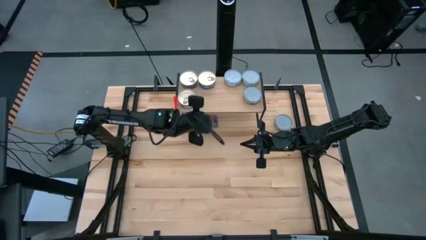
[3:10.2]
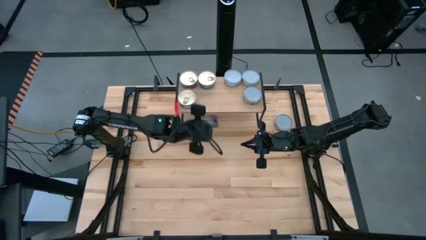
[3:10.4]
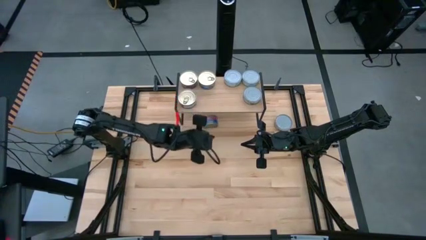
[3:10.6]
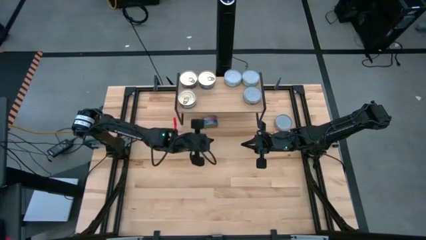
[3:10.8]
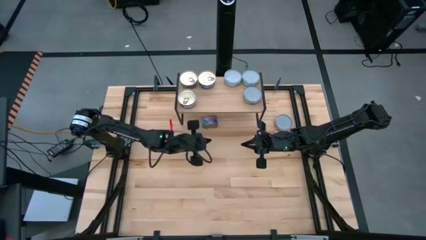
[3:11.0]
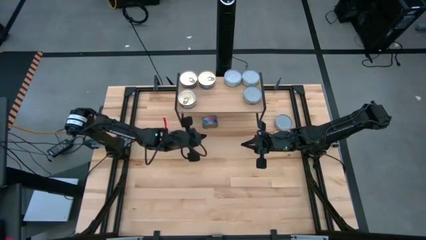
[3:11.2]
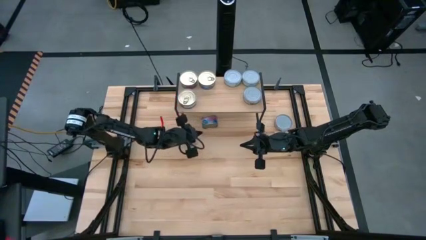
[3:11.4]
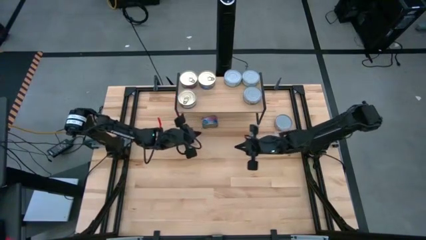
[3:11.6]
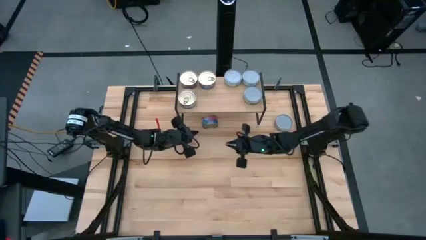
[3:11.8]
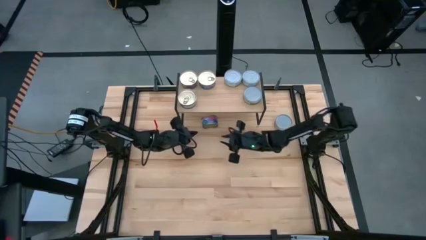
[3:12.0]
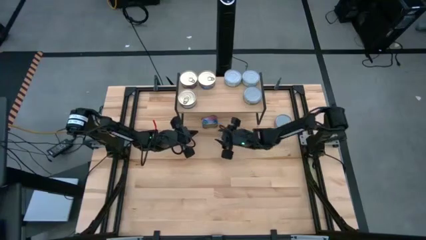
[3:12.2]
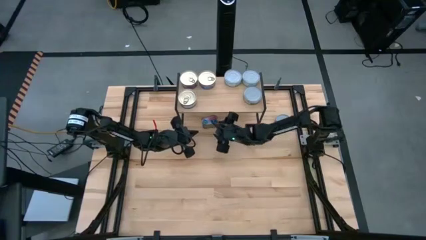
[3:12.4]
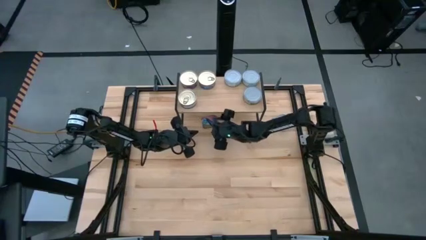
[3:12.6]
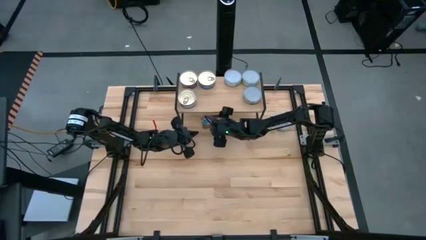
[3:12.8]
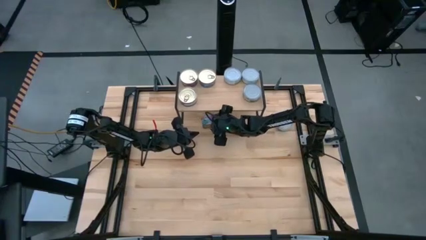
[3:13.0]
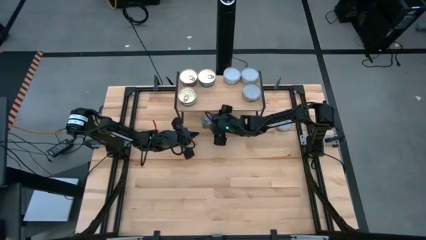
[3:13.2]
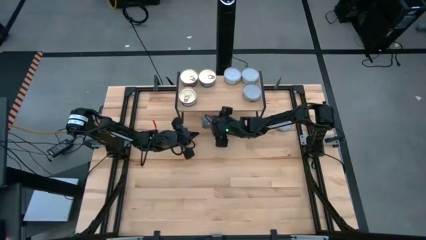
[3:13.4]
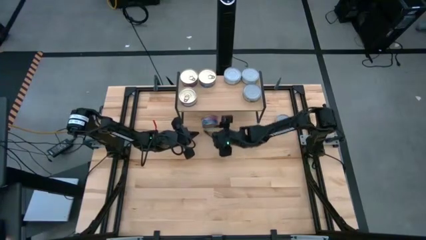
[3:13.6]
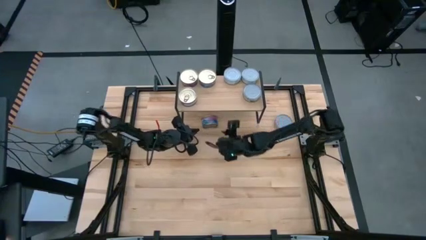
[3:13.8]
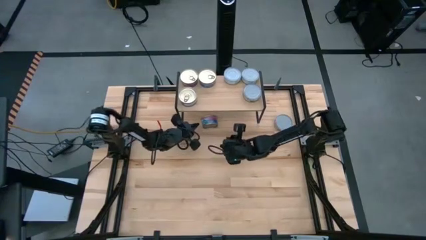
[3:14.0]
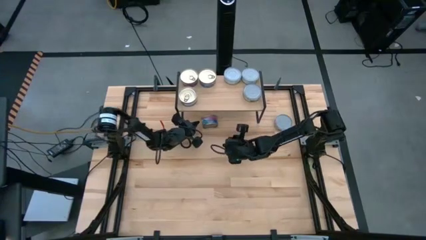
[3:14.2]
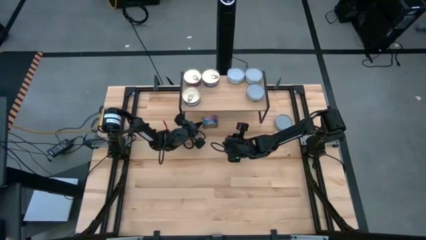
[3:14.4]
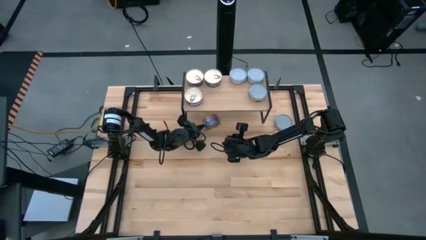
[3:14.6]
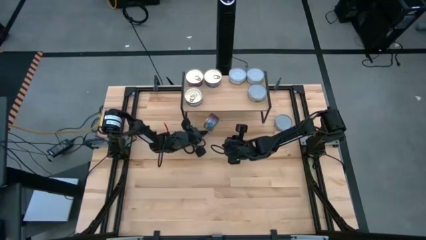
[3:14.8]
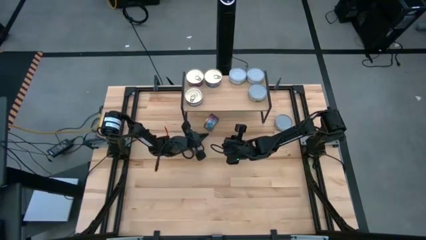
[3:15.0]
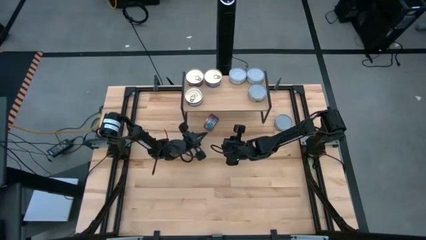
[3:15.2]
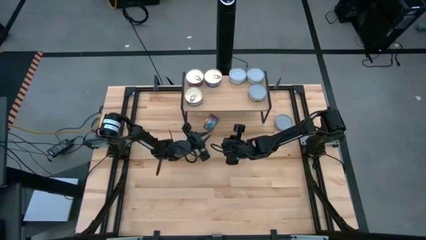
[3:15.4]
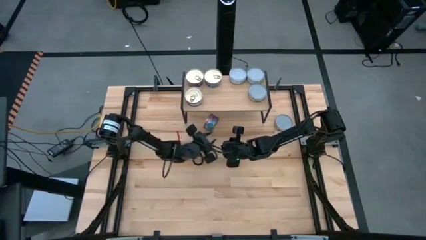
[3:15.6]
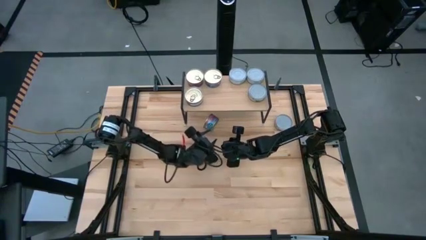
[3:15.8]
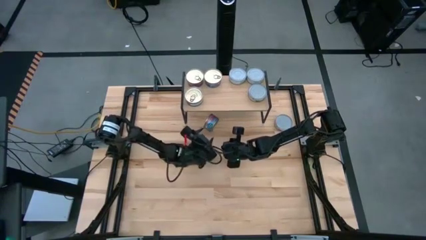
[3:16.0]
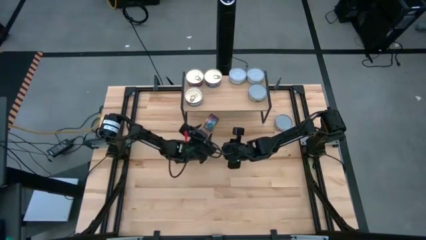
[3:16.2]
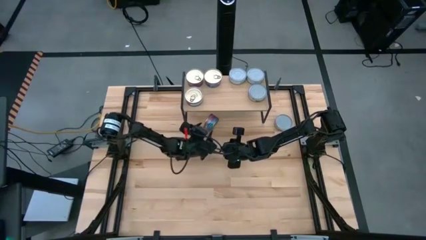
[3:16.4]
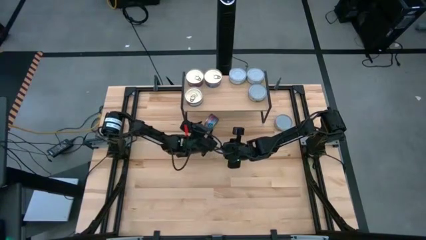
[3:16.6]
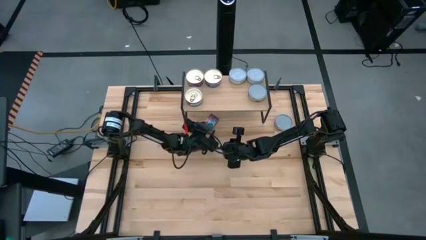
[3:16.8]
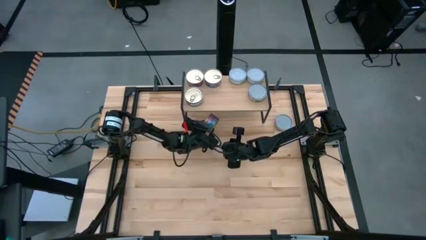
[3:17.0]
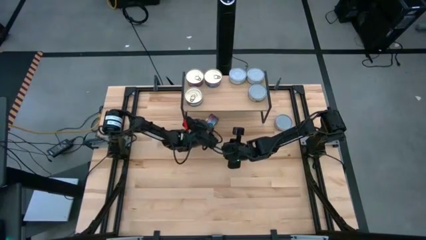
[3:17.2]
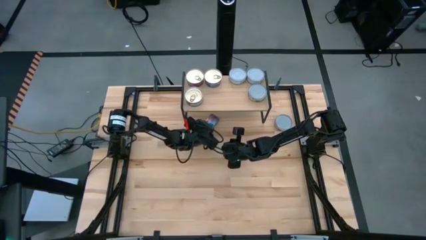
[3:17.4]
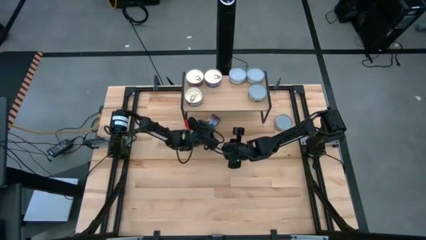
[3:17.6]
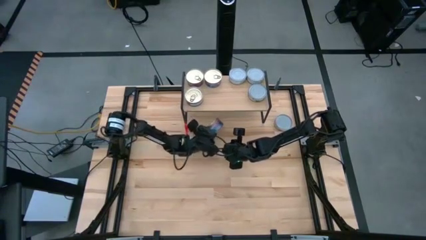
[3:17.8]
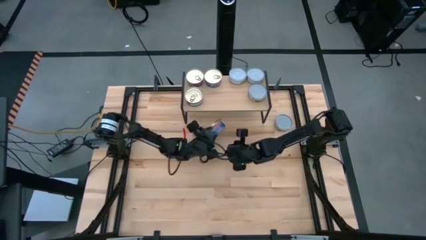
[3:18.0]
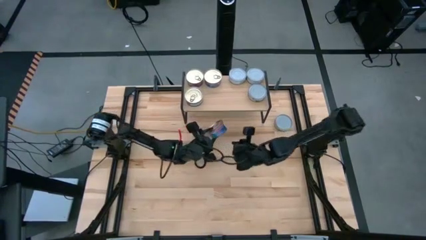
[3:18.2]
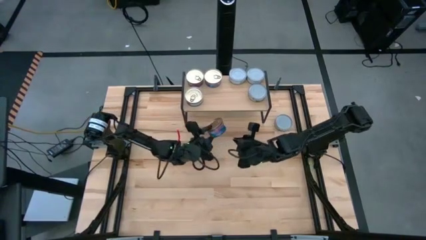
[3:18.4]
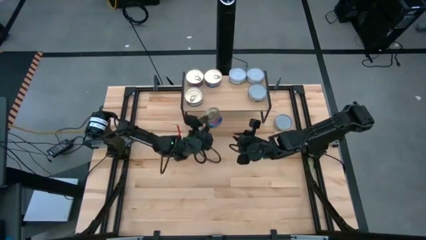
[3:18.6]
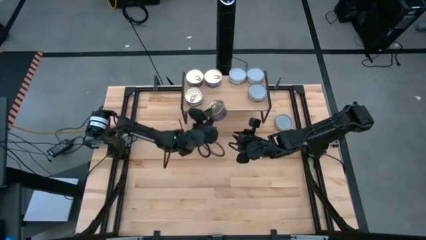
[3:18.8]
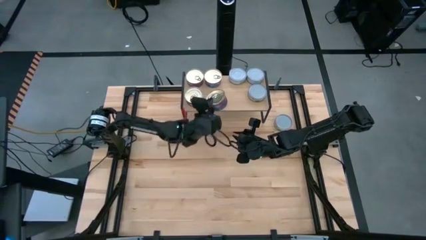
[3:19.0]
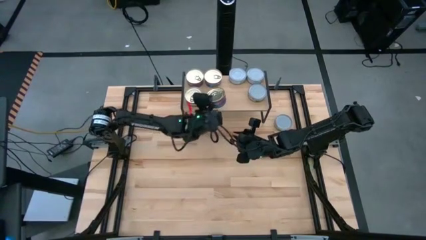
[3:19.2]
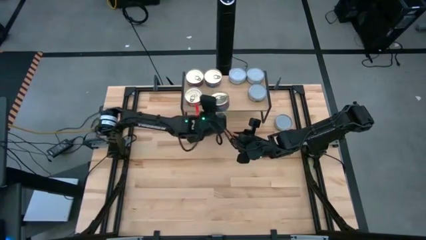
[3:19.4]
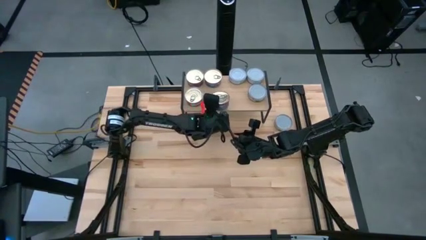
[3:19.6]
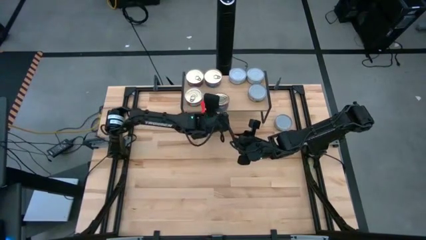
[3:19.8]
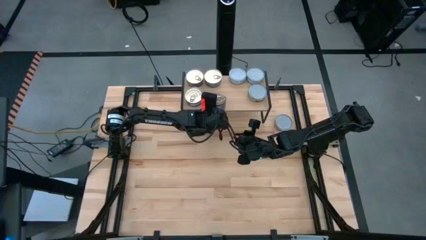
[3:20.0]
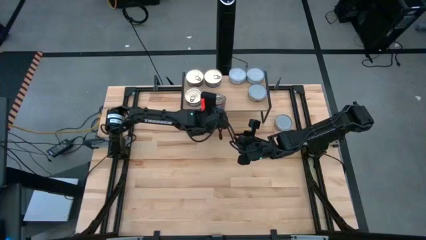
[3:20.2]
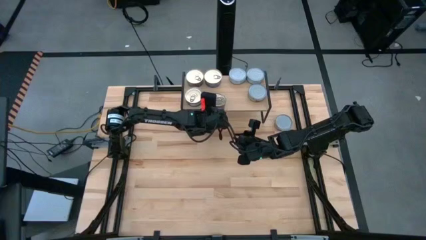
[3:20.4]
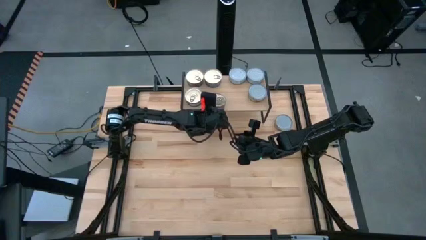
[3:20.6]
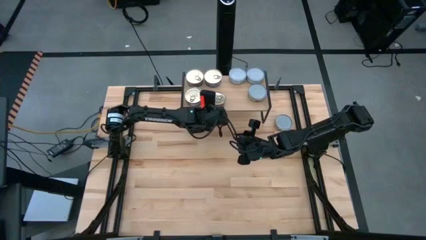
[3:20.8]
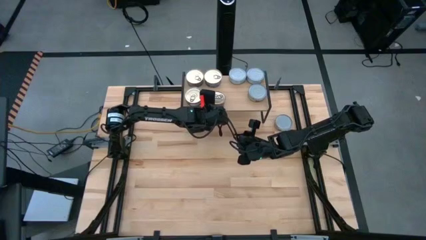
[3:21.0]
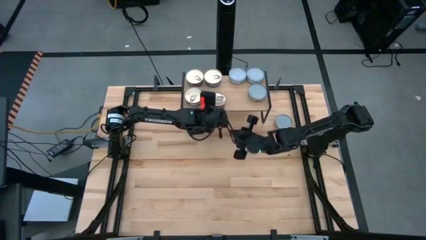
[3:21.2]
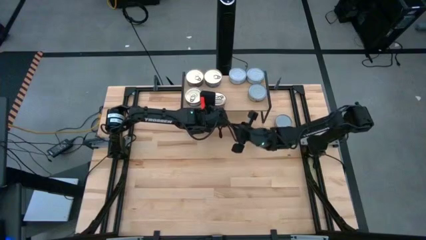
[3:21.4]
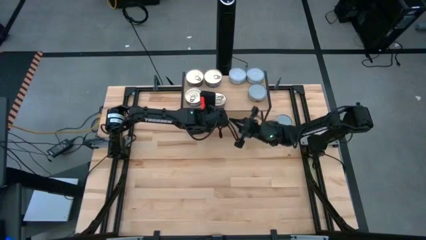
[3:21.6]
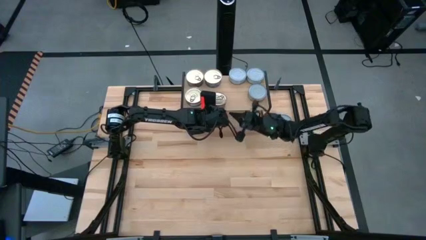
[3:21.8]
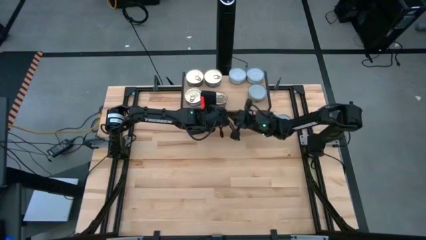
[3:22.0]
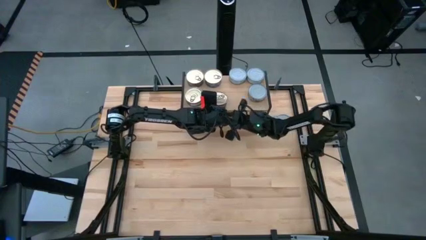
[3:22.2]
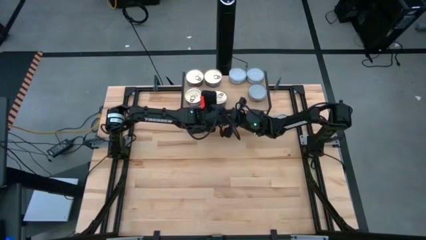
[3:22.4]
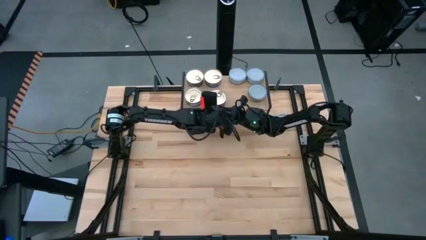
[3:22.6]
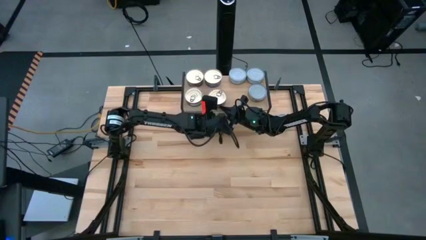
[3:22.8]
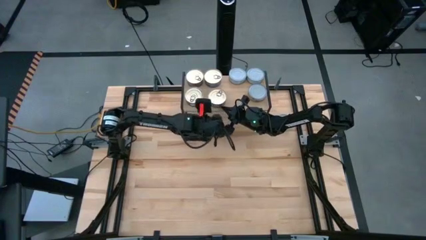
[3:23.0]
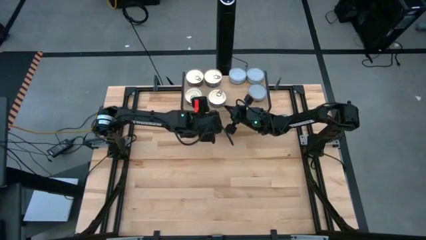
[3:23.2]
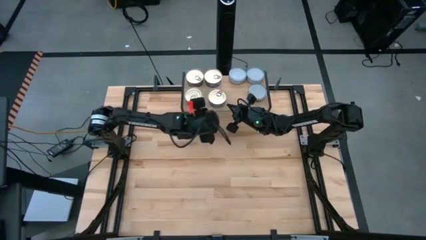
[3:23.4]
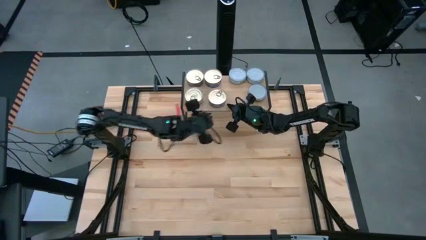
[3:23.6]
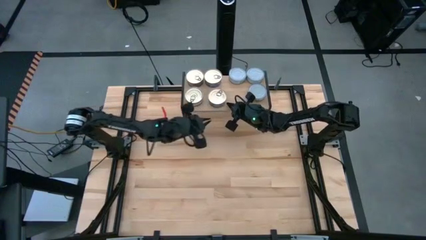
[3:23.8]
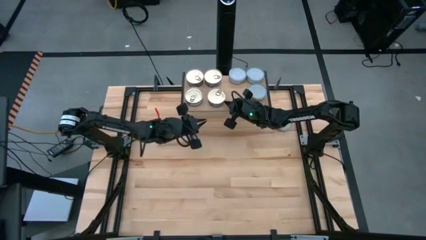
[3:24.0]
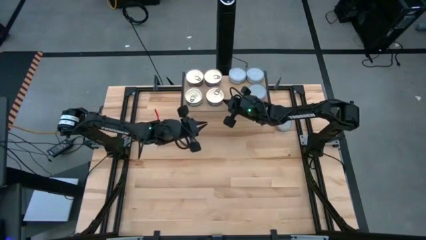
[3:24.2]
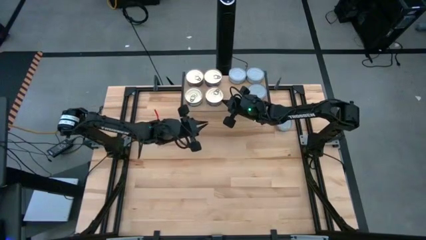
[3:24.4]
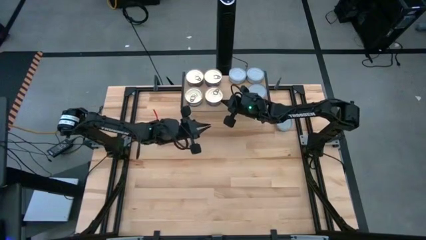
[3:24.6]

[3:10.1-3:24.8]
Task: Stack canned seafood by type on shelf
Put the blue tuna can on the shelf aligned with the other blue tuna can
